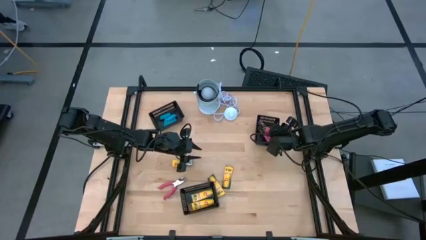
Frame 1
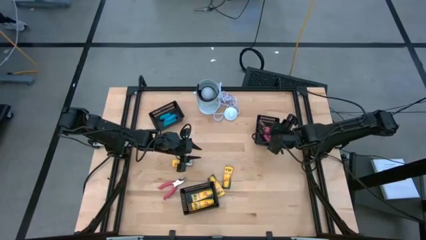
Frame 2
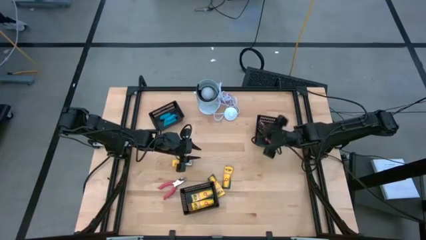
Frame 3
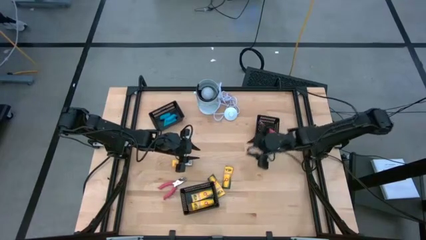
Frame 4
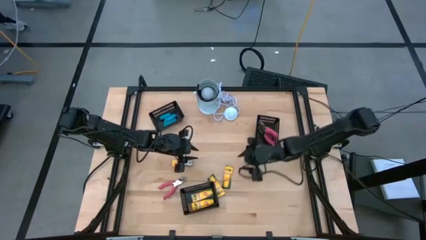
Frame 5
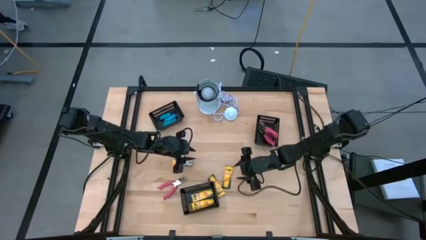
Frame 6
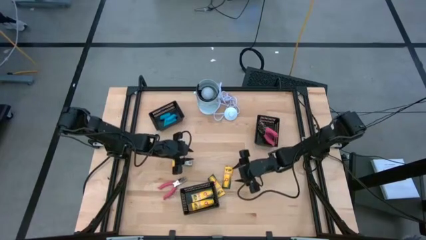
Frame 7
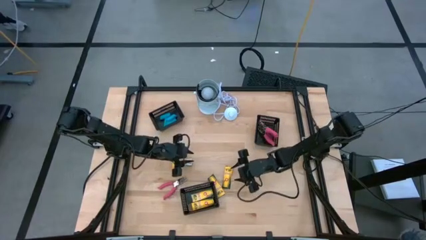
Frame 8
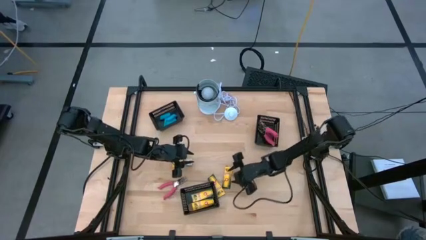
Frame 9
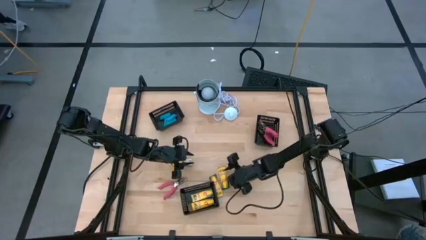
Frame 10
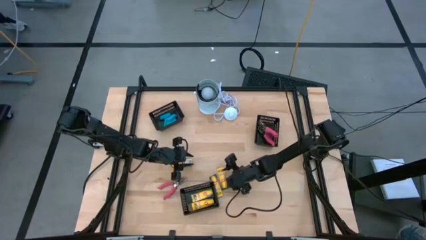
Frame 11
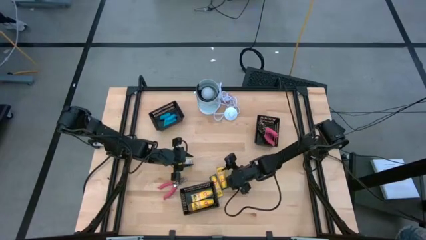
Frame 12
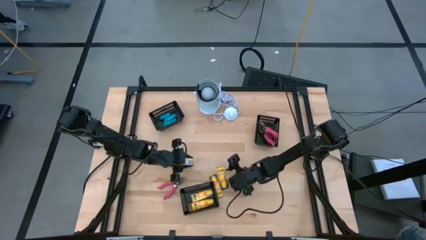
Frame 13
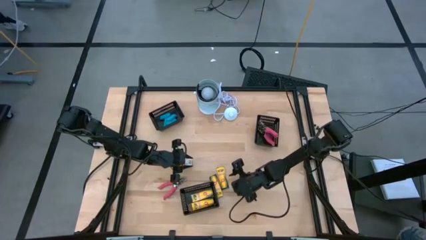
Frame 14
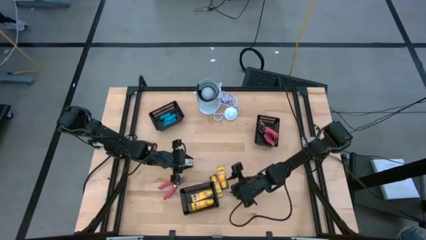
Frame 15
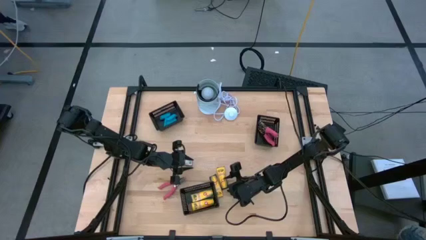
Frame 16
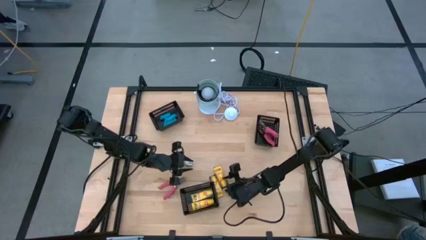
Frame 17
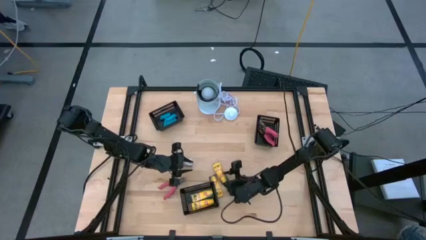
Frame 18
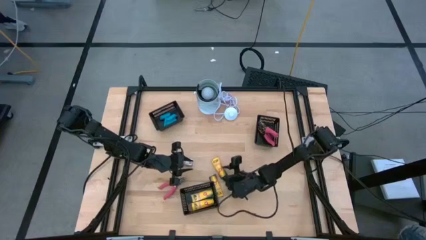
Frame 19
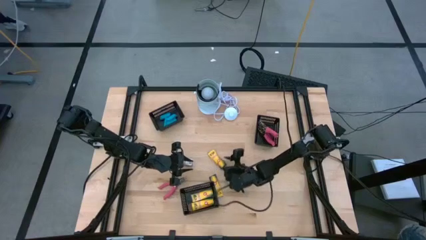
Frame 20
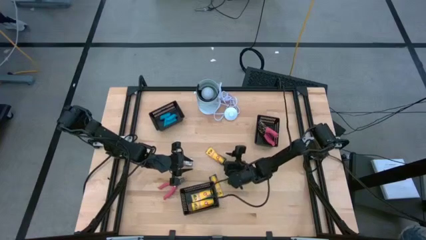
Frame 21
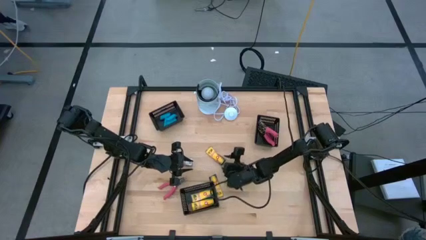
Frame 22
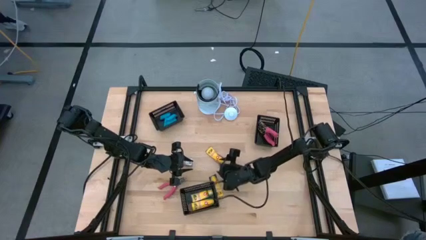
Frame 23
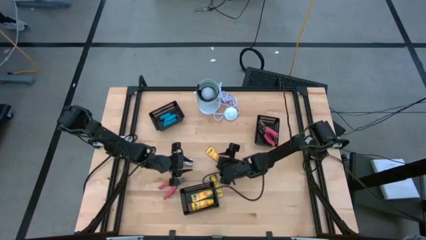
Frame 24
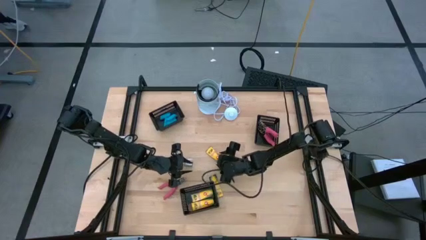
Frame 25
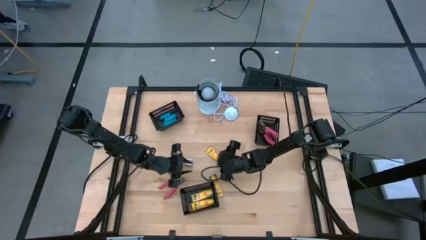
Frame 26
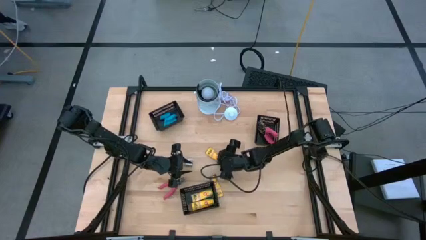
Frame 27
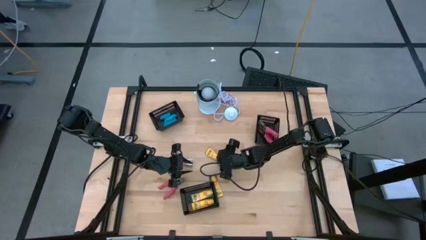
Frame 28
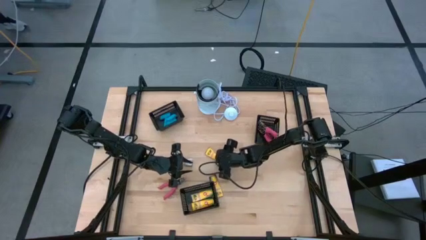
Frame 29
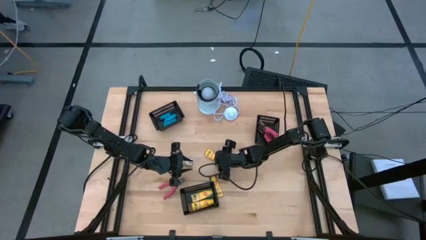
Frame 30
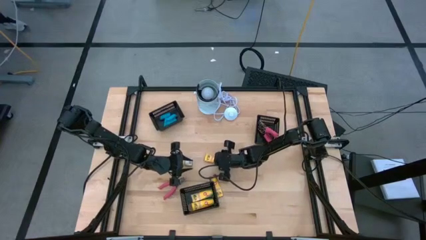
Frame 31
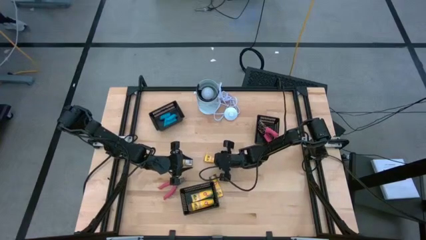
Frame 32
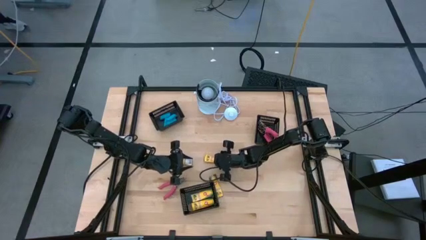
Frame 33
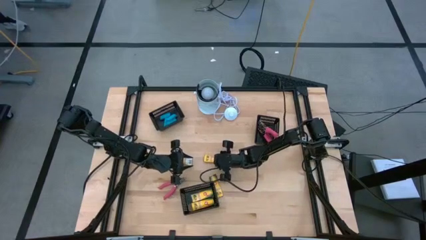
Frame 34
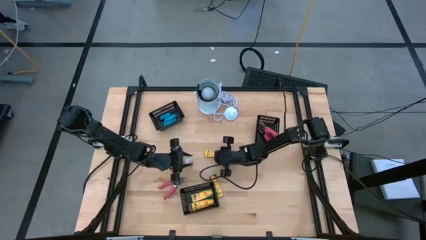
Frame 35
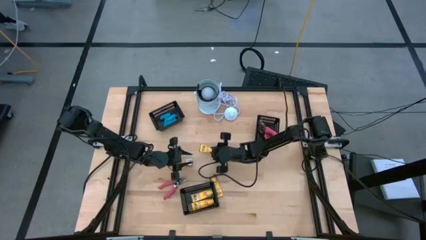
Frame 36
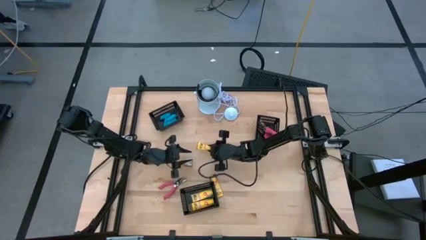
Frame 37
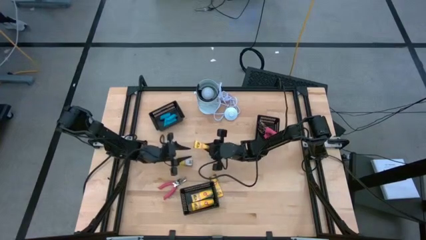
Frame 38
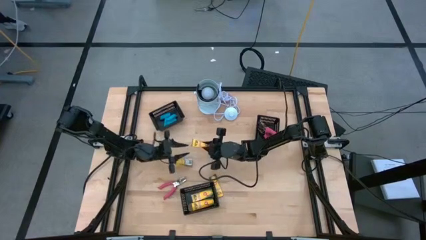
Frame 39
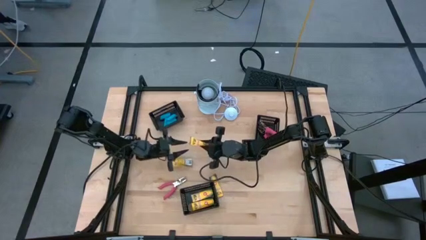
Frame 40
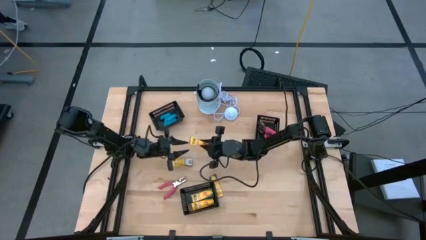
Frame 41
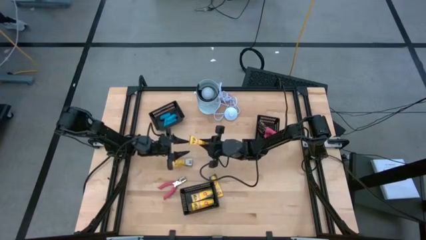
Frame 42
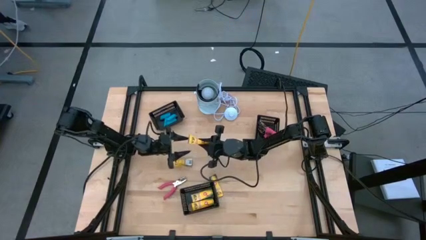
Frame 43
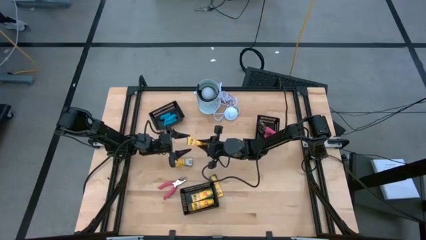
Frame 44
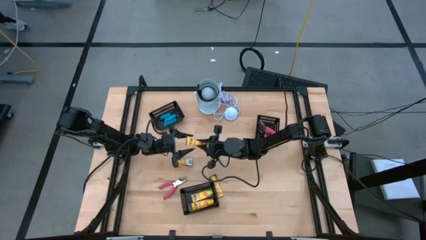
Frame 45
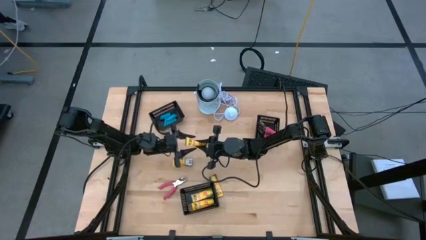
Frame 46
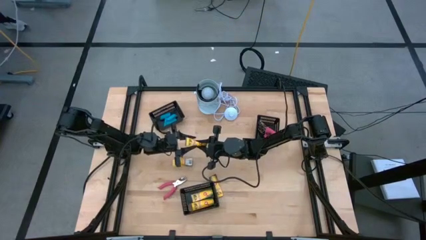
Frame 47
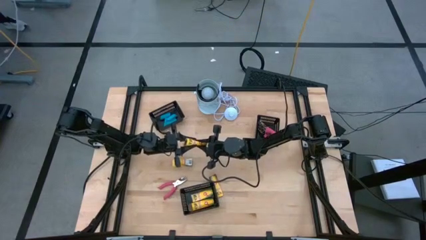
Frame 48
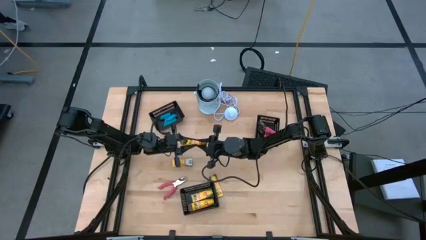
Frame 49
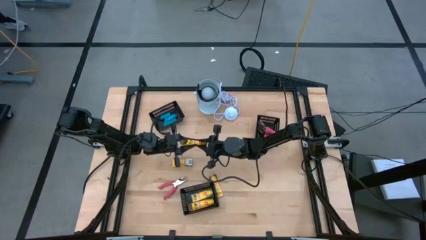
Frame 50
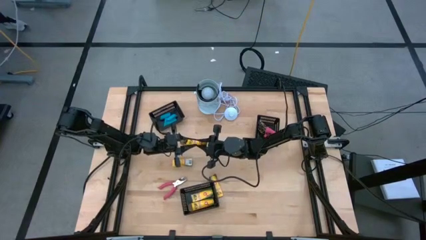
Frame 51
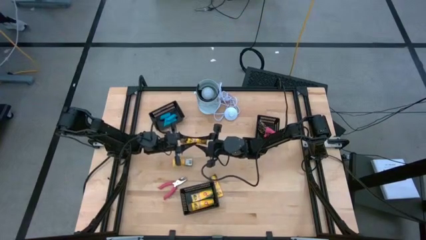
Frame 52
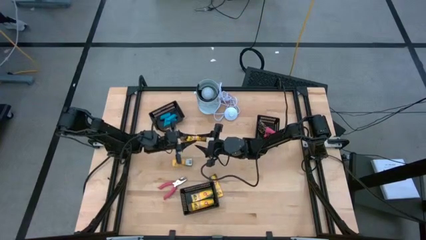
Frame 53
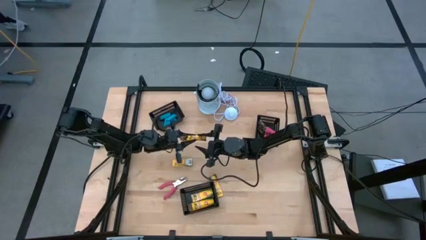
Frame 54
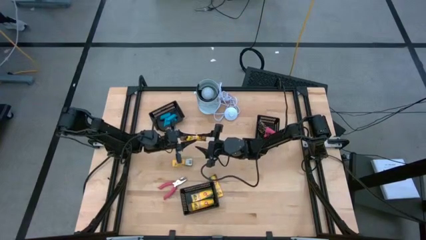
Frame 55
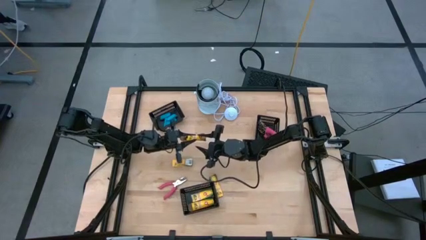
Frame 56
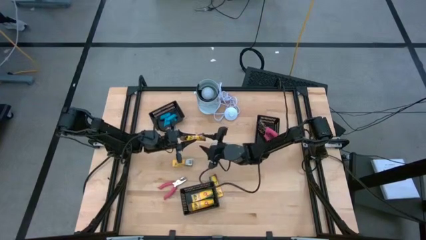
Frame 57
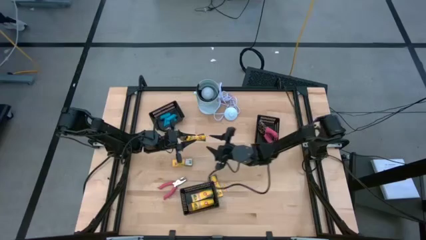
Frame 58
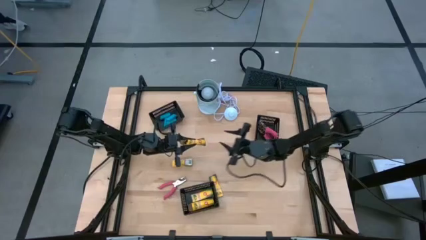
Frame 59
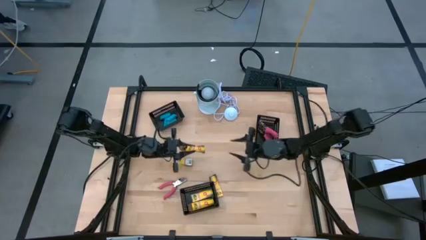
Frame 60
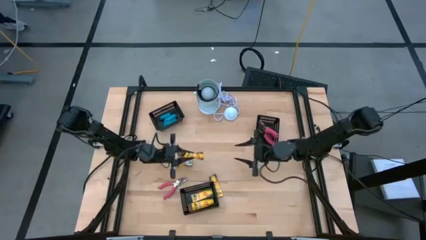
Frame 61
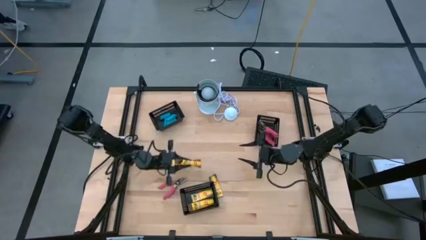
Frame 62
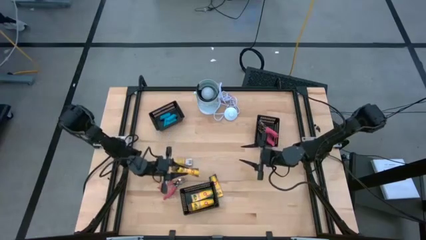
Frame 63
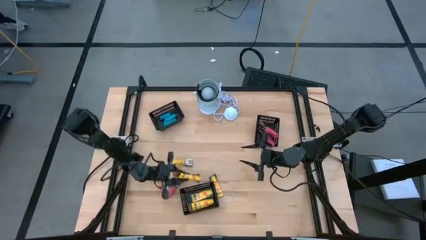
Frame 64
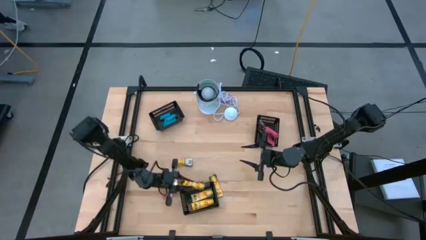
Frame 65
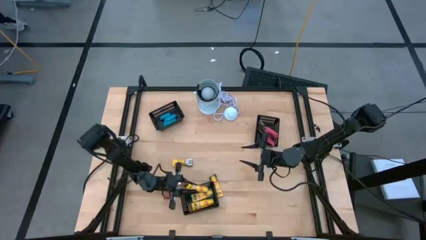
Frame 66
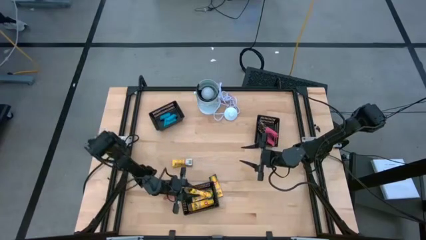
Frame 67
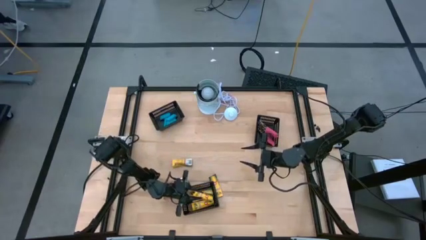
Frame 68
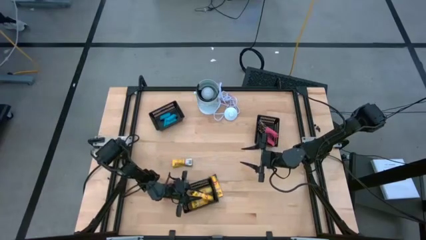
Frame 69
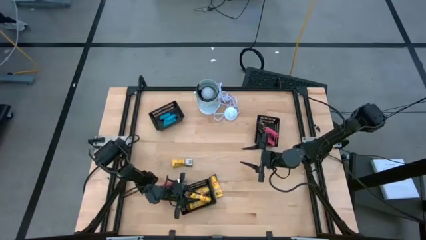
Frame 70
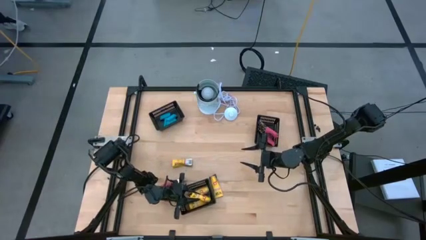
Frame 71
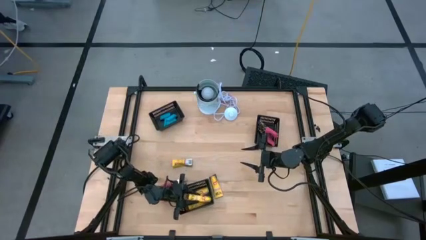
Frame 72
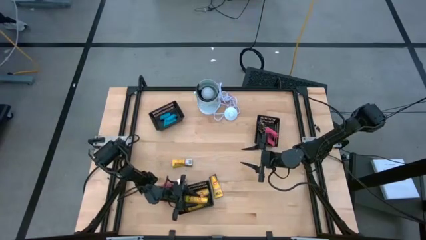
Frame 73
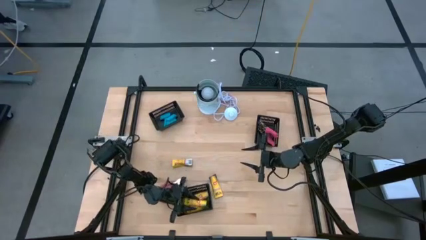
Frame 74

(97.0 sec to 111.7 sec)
Task: Pick & Place School Supplies
Put the yellow crayon box into the bottom black bin
